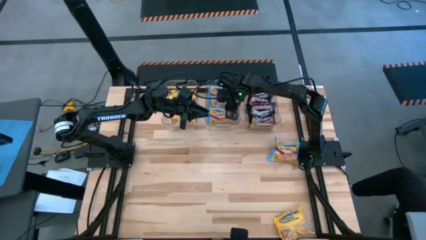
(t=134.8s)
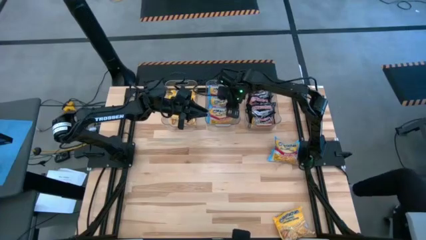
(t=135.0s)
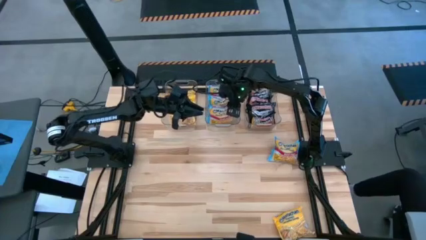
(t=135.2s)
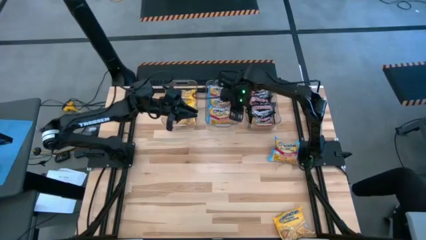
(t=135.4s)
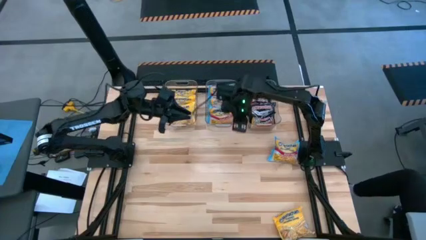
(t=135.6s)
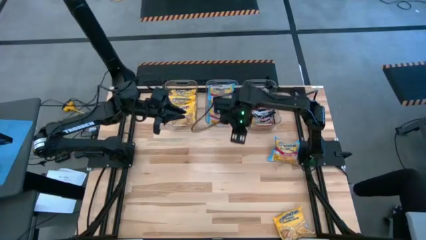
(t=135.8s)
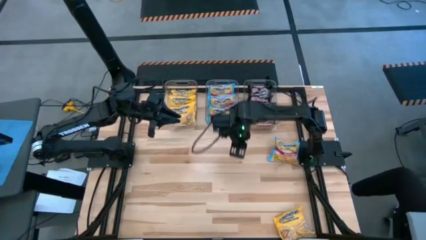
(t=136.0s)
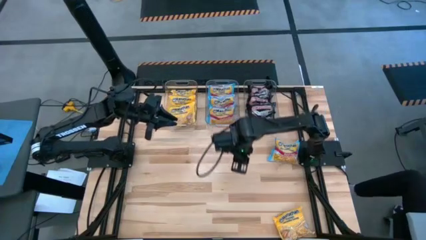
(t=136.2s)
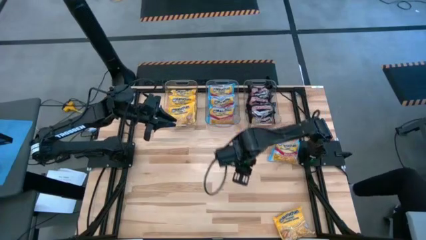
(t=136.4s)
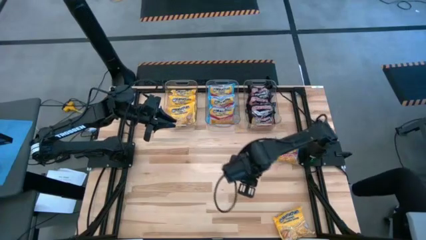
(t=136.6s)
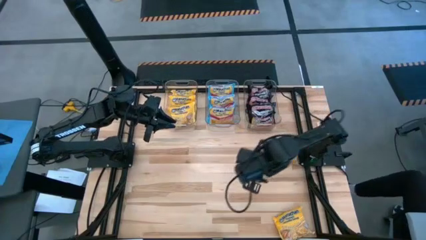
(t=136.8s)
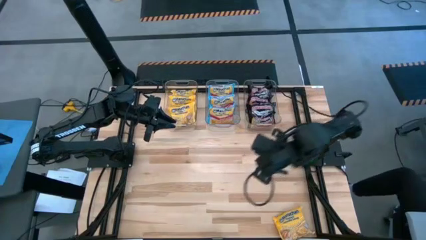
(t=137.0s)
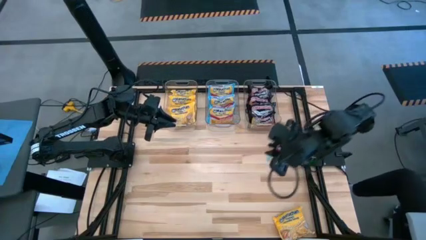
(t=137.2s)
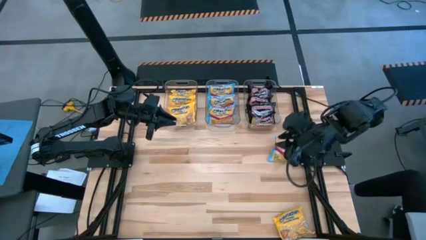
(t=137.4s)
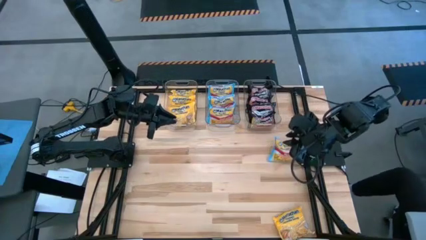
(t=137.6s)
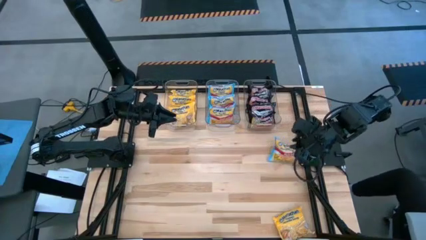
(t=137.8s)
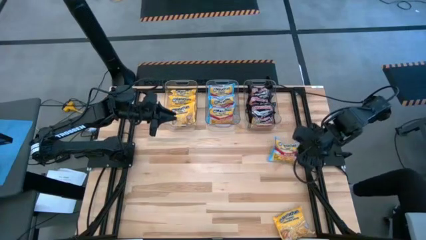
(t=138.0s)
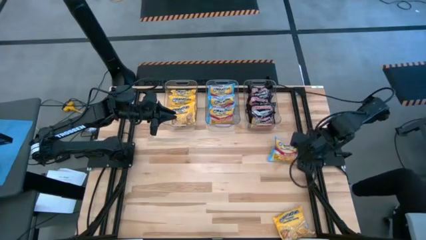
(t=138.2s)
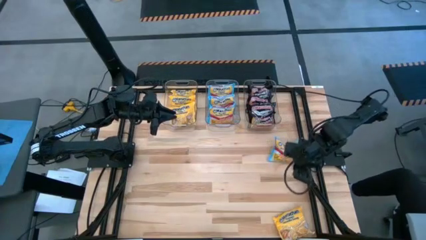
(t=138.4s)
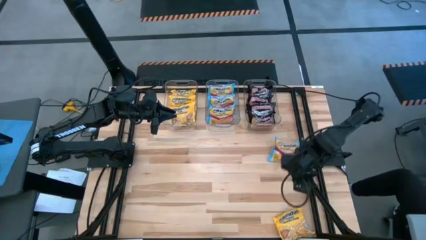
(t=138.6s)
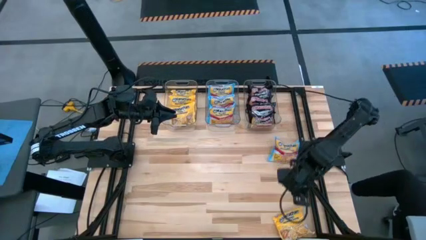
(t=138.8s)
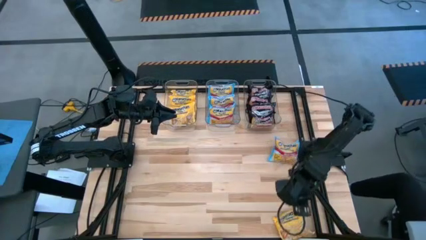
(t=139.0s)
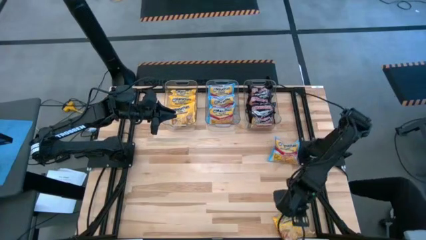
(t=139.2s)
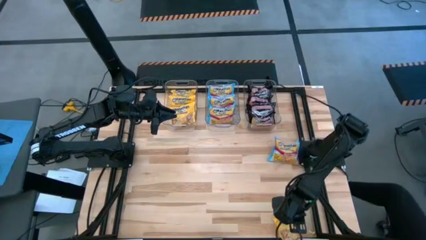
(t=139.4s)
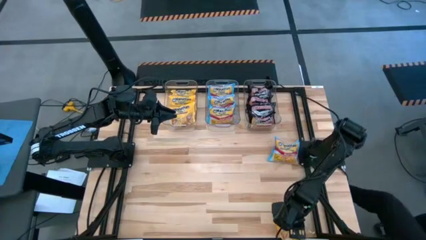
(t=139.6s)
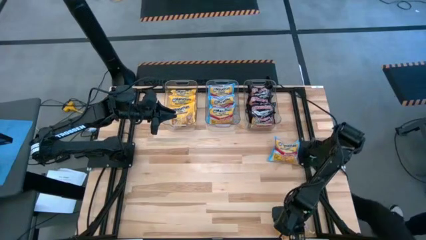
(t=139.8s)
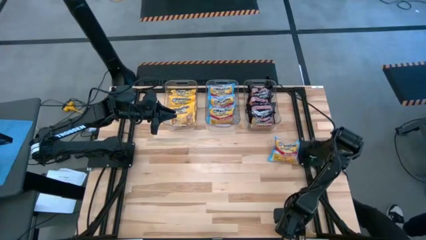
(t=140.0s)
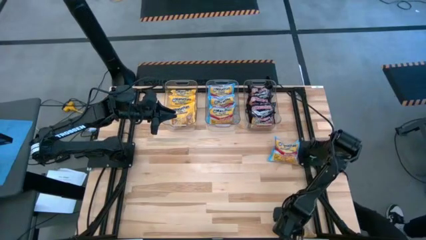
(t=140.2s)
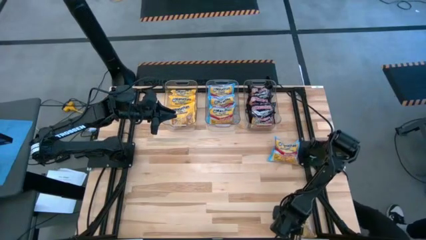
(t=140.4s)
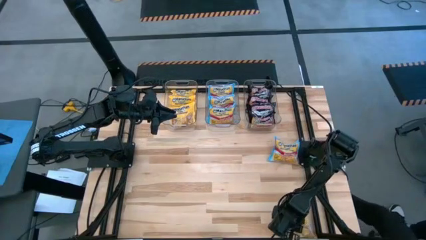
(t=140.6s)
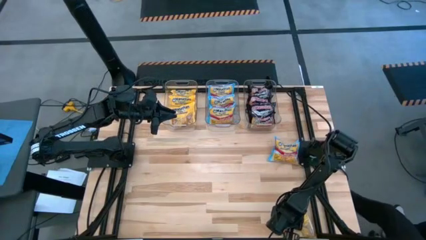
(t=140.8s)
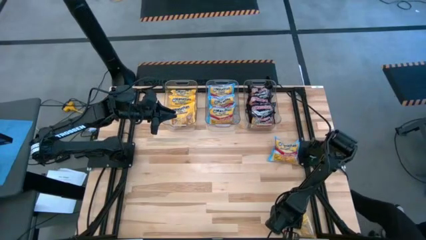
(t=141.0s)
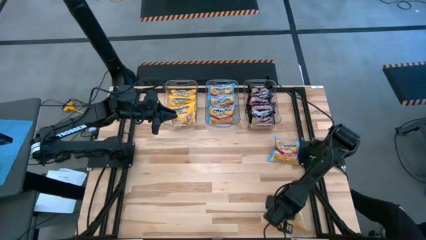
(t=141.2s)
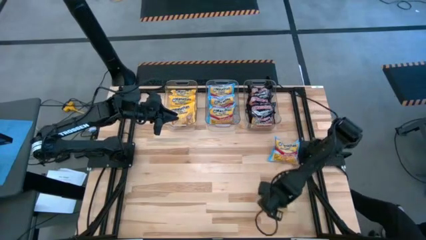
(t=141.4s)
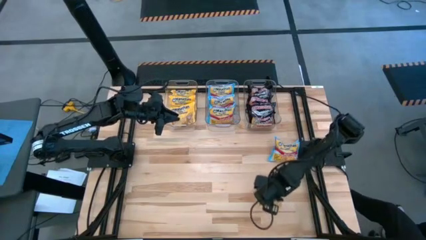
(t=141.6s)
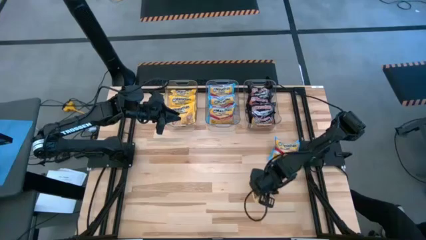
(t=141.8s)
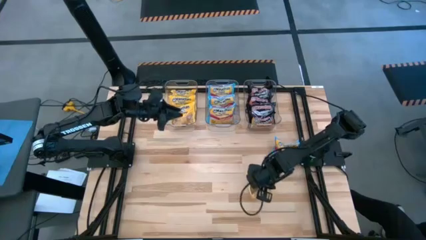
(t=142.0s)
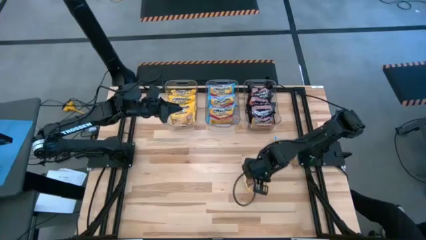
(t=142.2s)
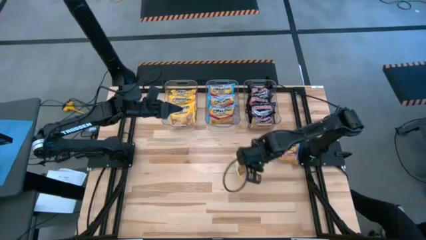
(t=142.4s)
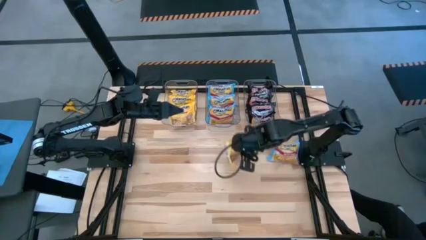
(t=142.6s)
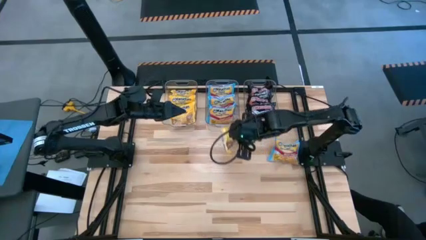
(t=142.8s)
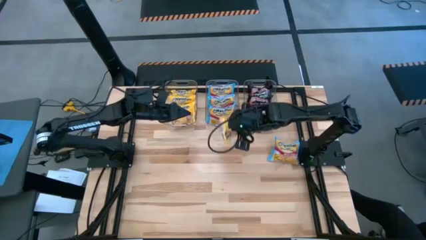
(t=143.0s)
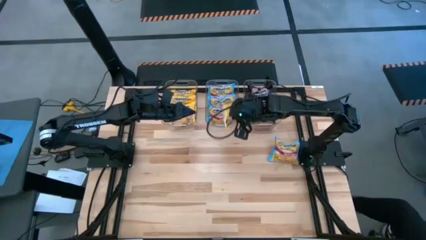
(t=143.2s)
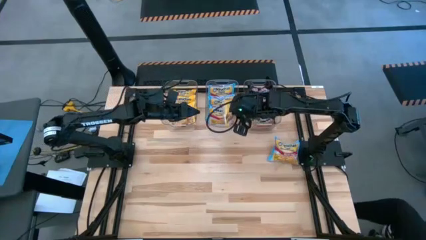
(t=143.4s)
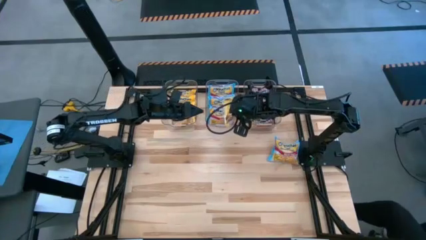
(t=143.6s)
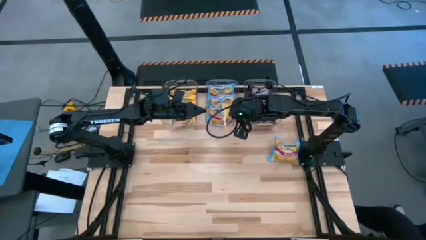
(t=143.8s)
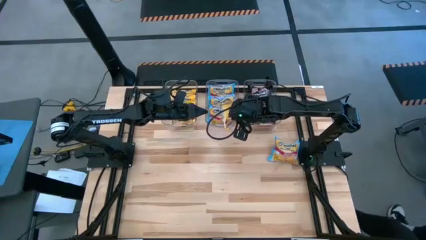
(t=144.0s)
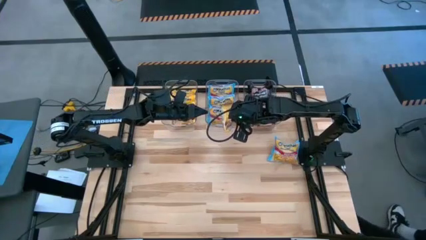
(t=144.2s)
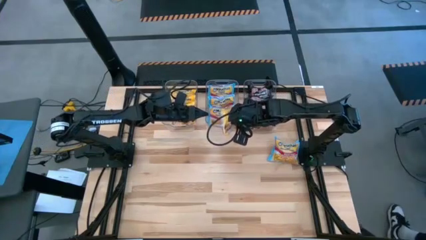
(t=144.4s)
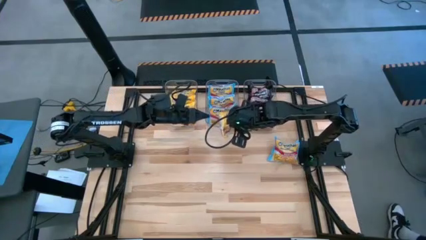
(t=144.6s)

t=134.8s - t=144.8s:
Task: Sort Maruchan noodles
Put the yellow noodle pack into the left transparent bin

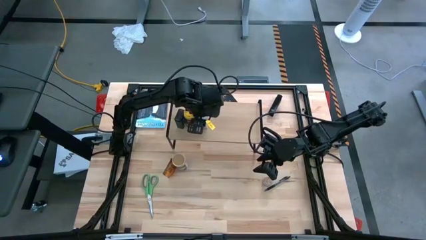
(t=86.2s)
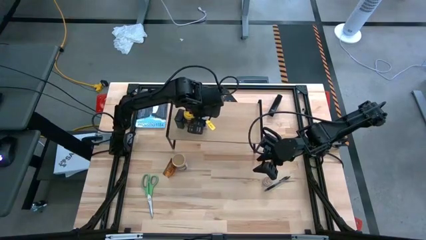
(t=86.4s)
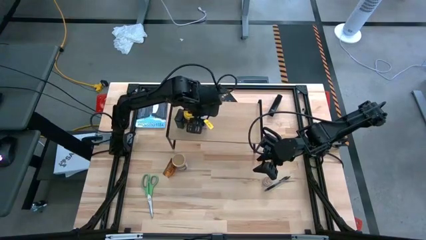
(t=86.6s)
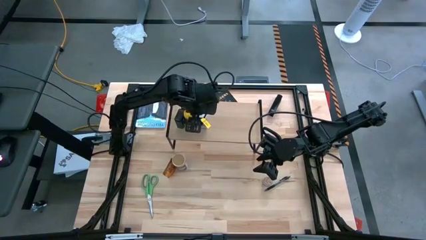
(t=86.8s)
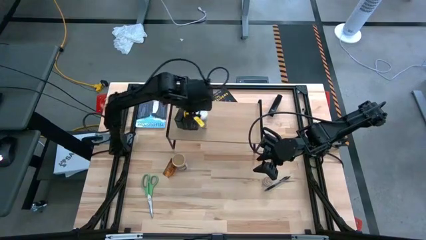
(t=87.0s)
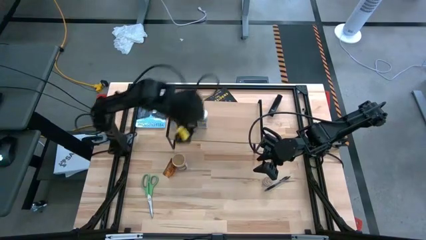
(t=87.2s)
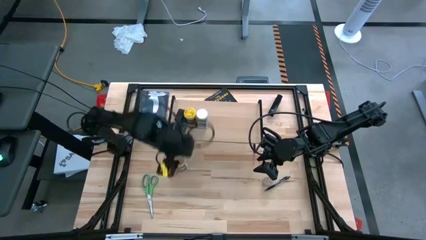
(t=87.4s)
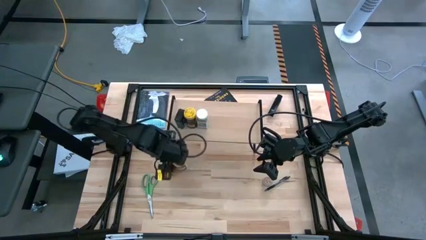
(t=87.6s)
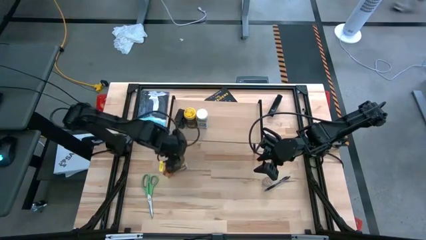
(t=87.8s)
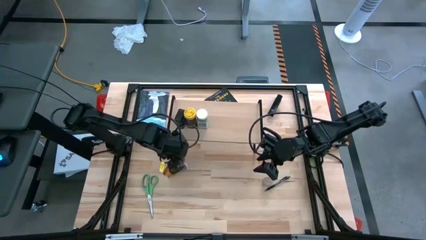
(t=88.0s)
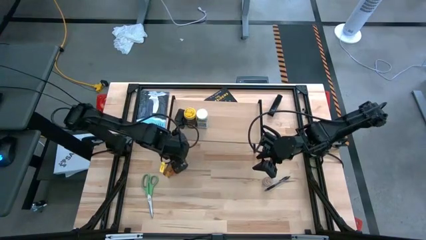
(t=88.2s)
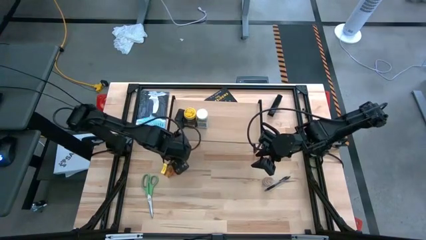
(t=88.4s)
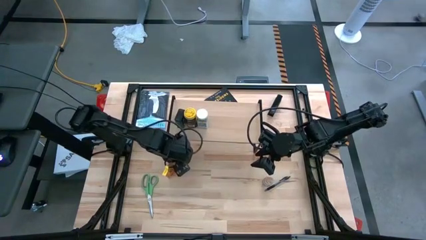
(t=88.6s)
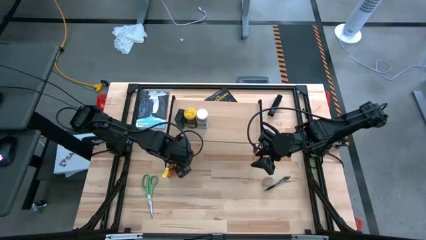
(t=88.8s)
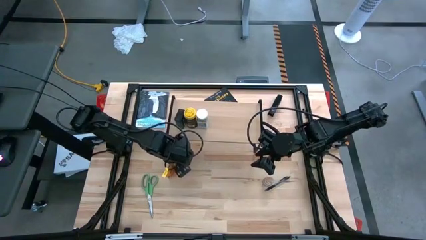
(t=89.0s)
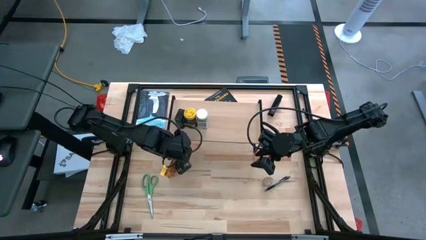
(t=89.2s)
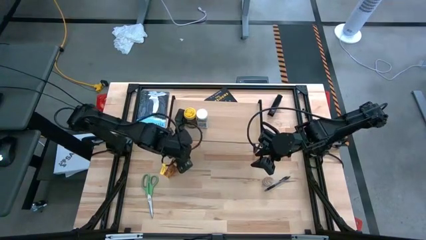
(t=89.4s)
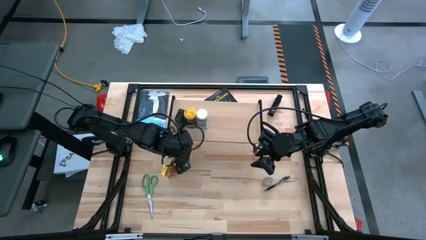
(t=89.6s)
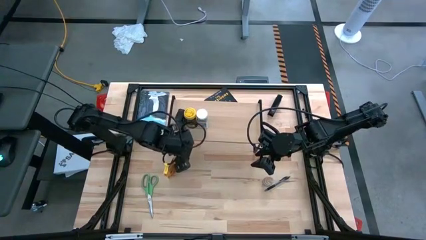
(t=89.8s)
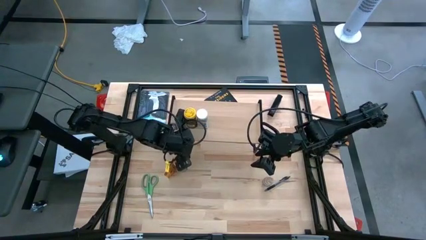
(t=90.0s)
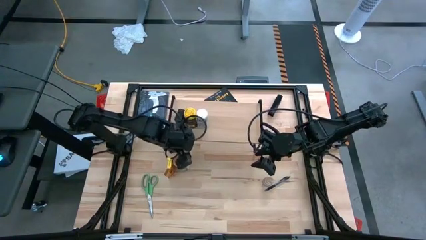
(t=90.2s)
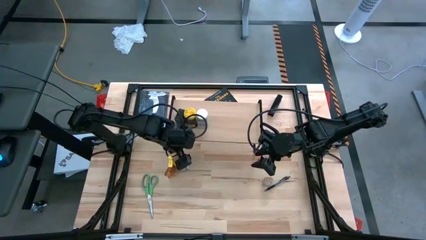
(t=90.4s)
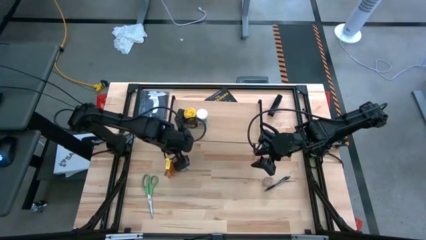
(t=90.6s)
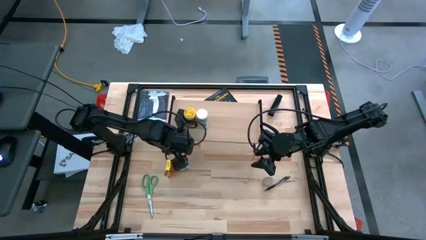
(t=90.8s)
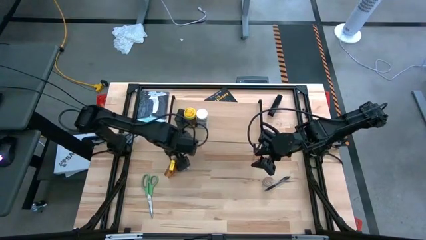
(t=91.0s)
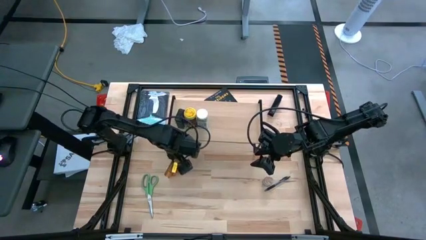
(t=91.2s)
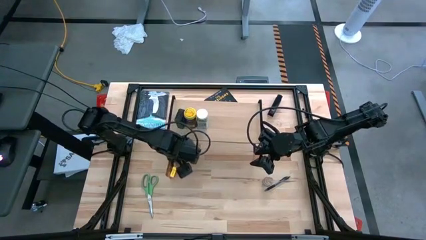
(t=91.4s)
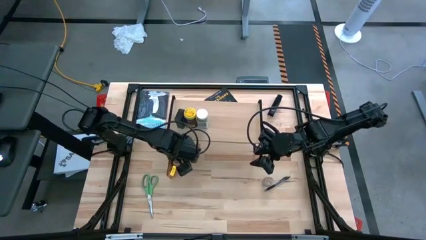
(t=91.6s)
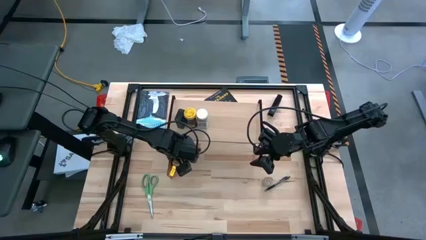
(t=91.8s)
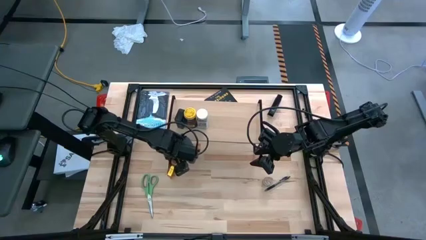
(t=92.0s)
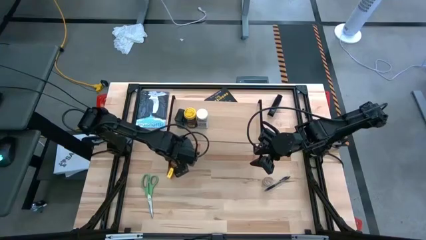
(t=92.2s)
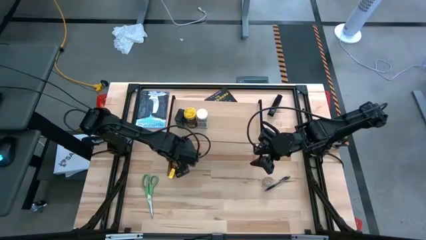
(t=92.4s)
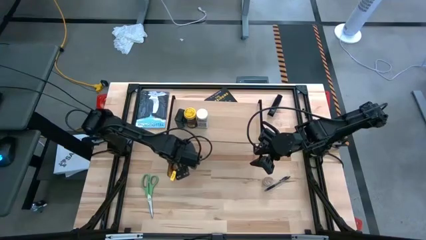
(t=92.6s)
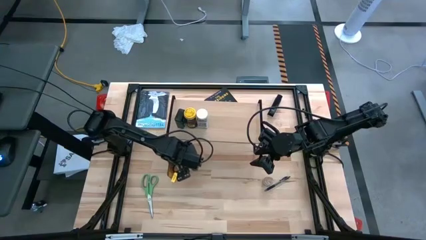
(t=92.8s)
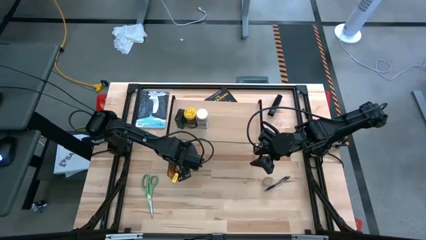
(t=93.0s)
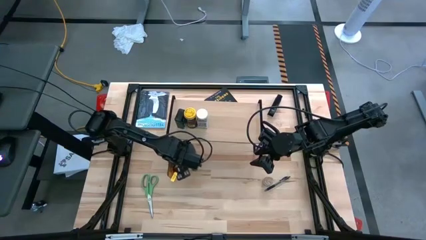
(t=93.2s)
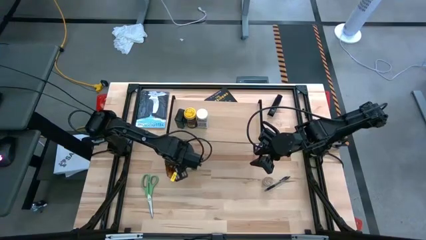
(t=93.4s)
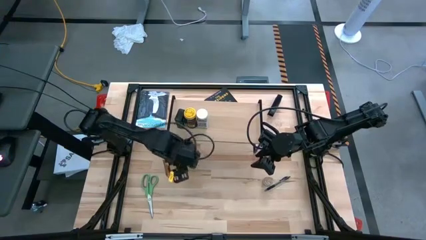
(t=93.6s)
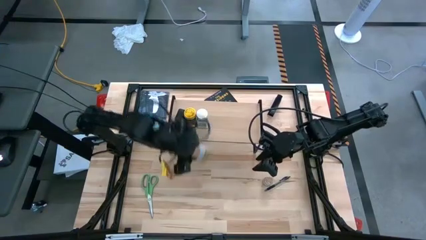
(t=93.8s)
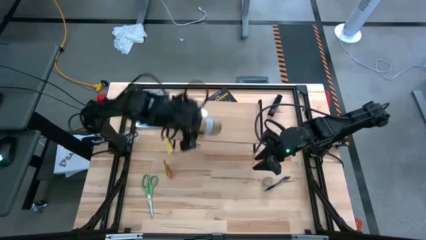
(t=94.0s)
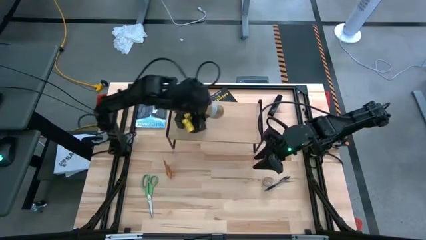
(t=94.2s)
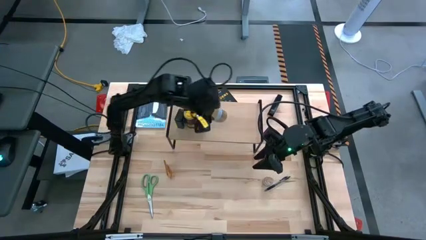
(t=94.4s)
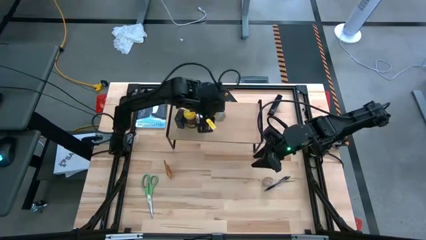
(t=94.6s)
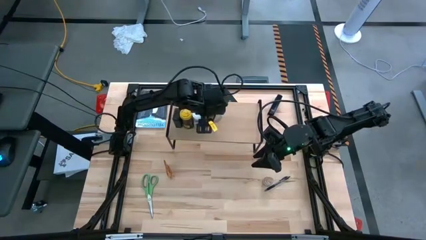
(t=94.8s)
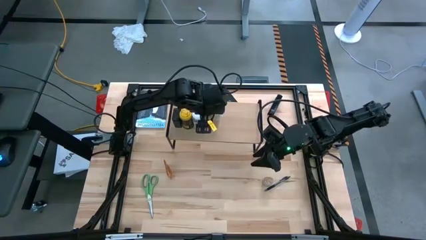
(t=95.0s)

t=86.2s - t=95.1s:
Task: Shelf spices
Put the gold seasoning bottle on the shelf
